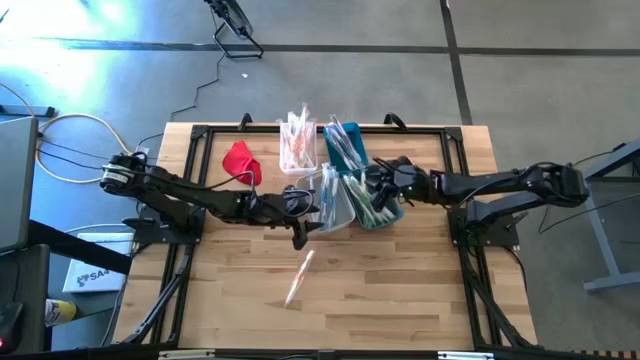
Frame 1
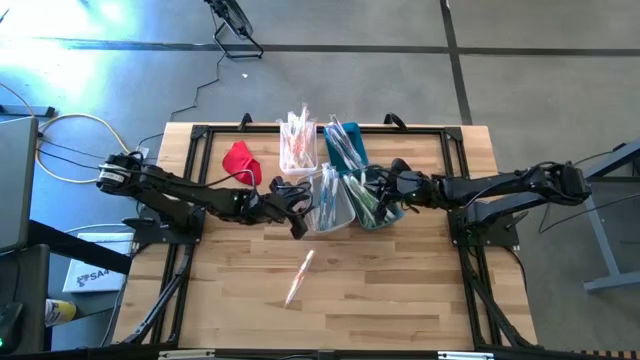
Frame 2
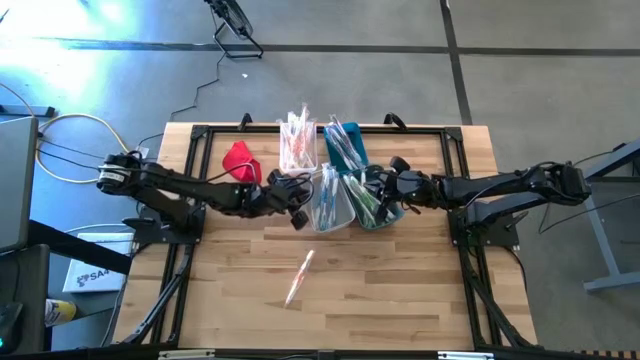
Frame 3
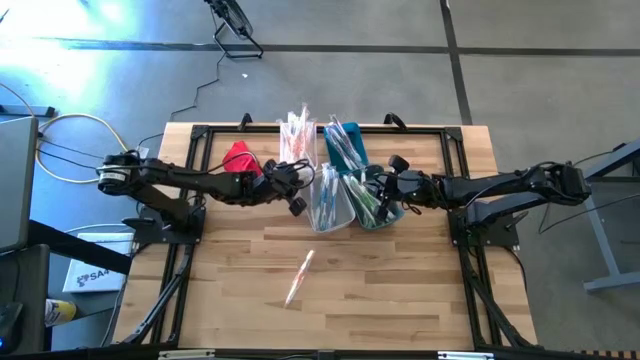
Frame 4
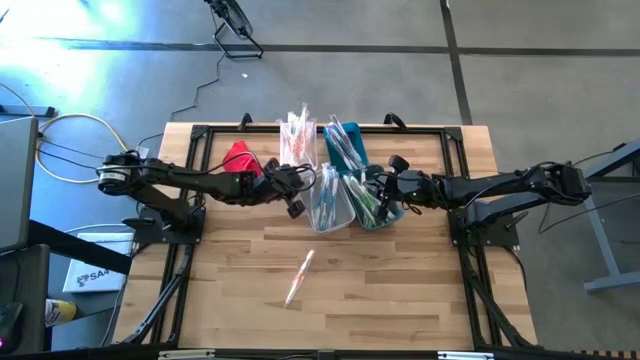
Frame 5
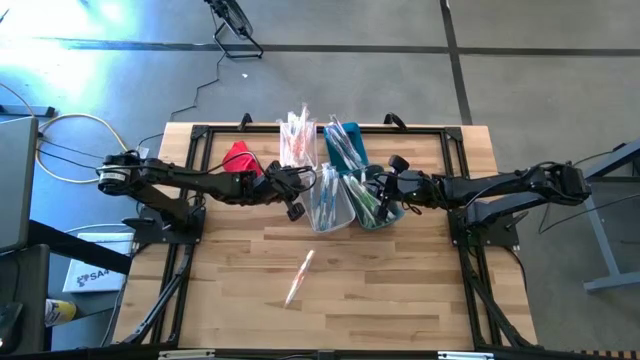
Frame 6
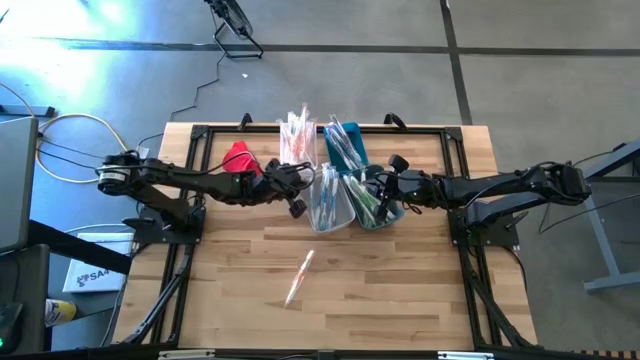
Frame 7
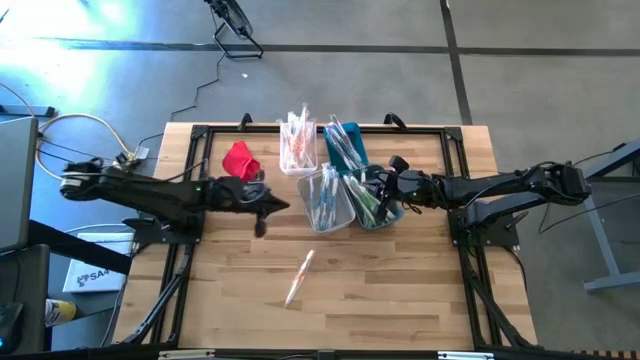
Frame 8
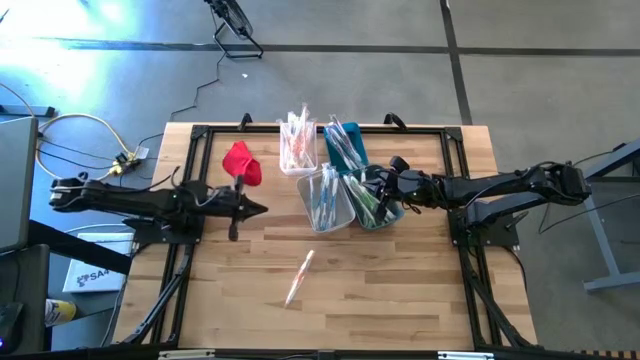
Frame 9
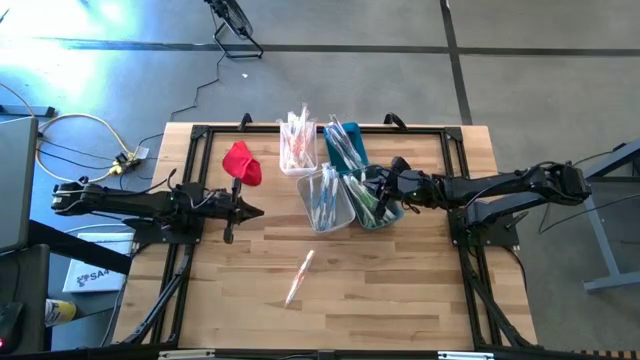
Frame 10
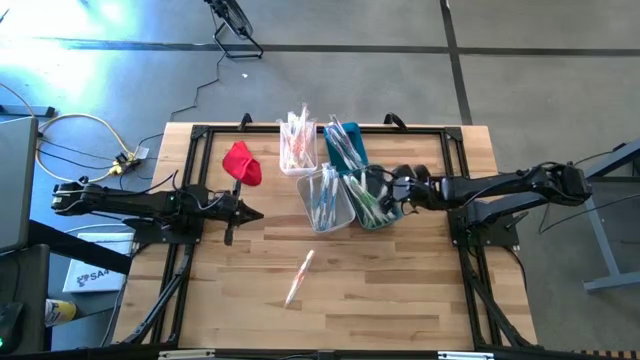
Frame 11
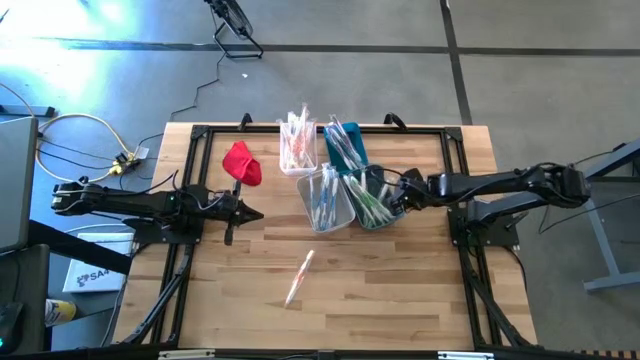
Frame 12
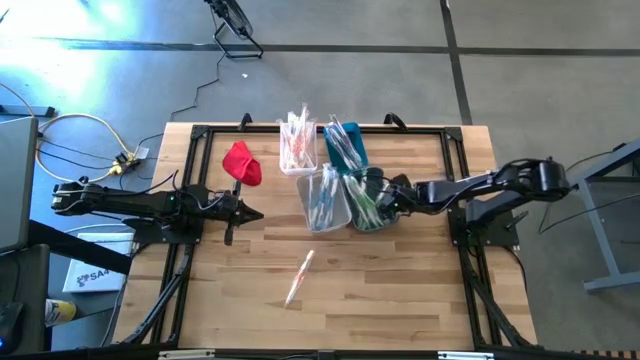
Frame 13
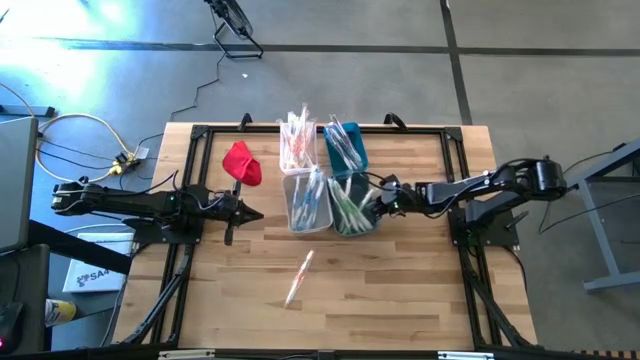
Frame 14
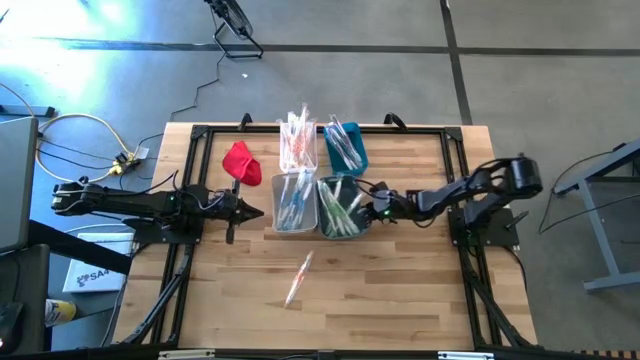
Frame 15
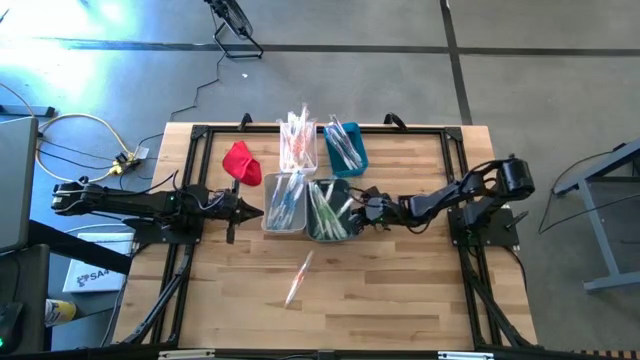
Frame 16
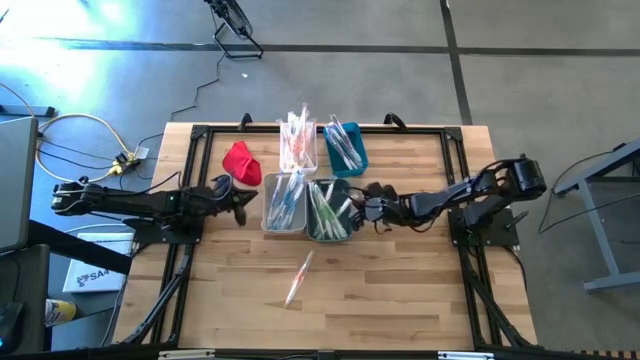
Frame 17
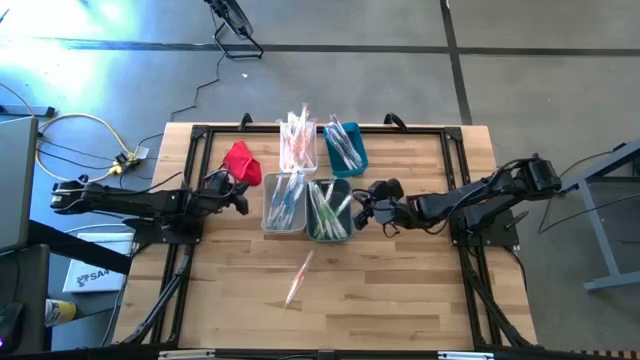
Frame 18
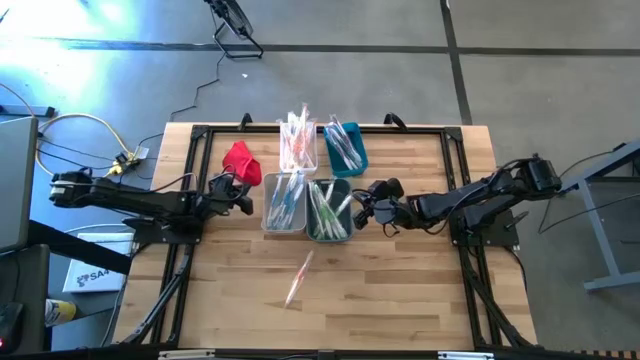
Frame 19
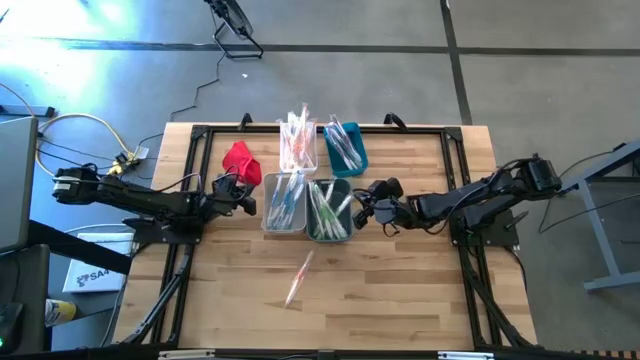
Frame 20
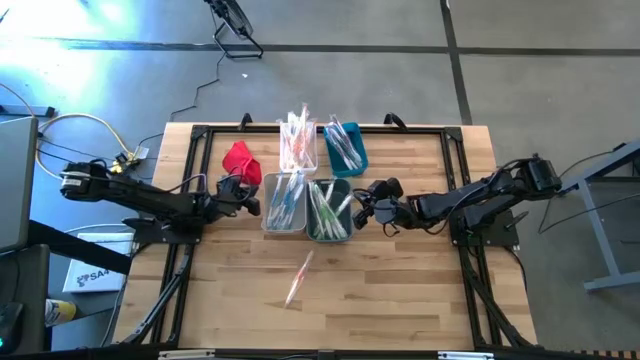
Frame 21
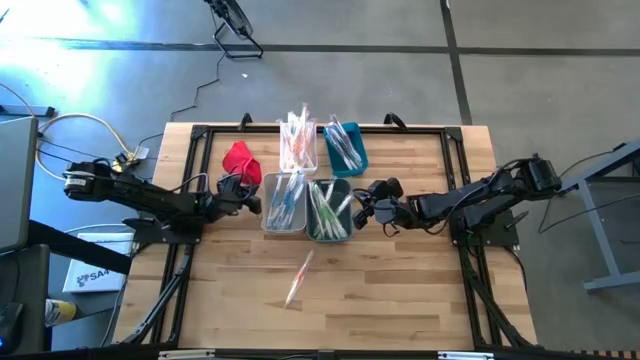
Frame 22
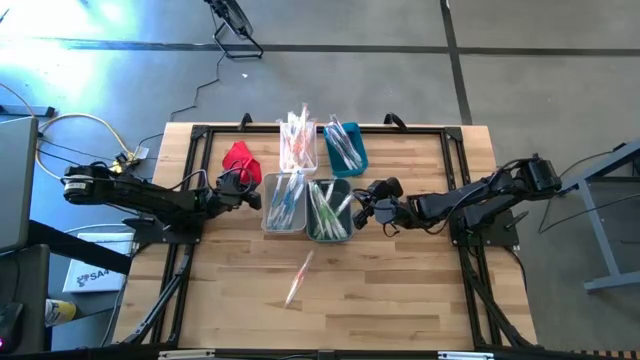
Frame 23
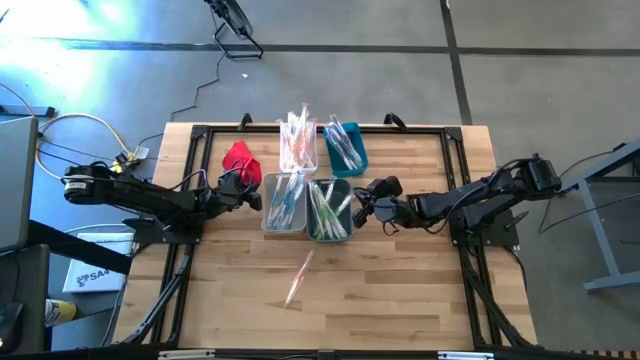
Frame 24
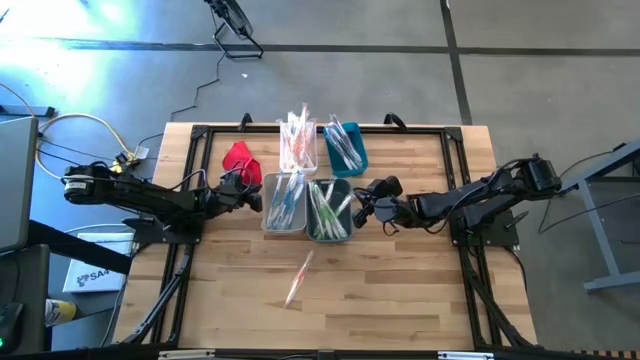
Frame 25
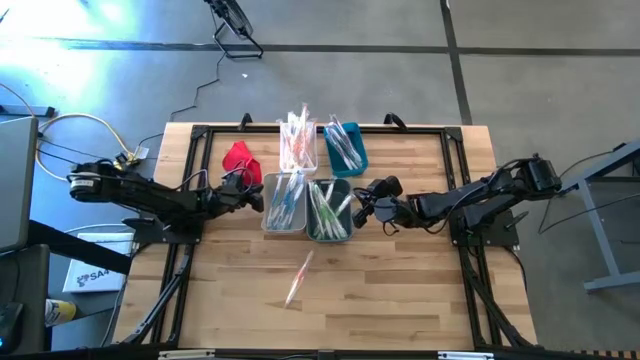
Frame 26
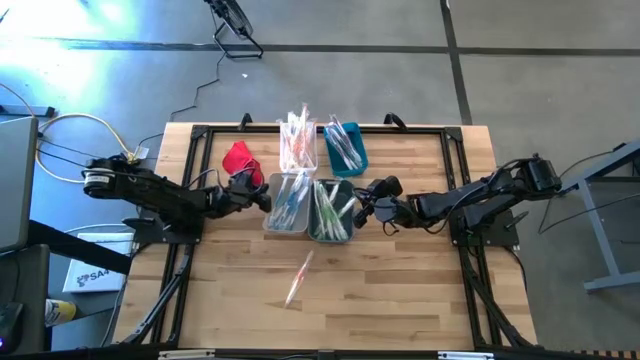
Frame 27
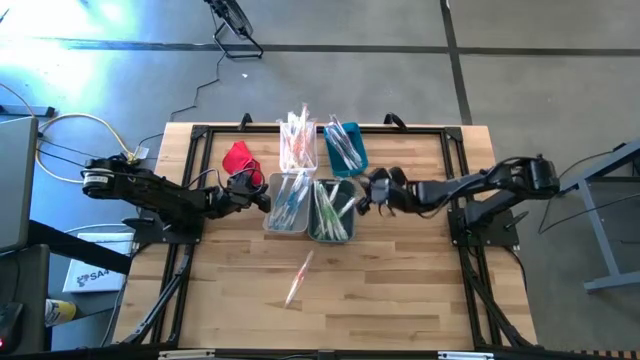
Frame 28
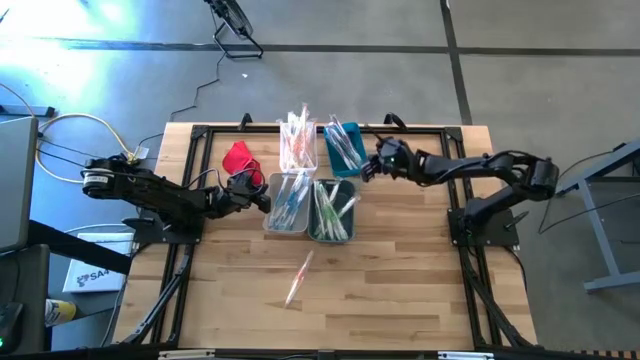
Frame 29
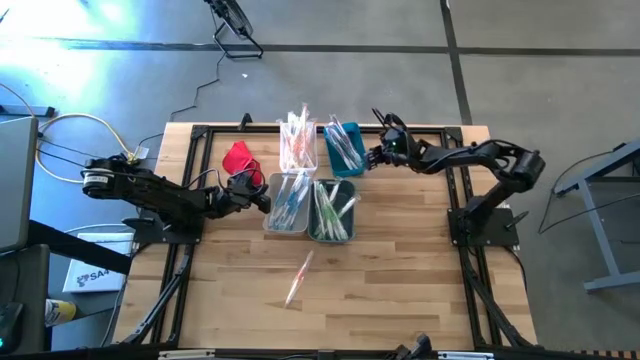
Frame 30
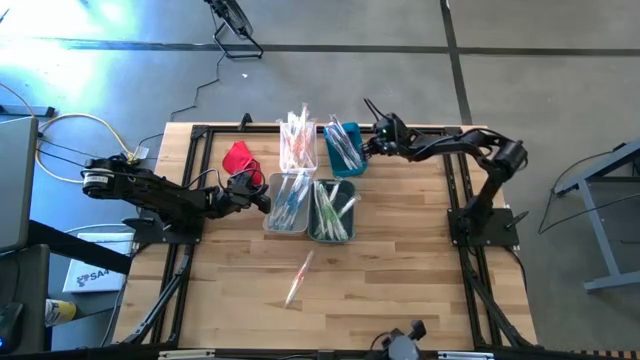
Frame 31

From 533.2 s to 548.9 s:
Task: Pick & Place Toothbrushes
Adjust the bins
